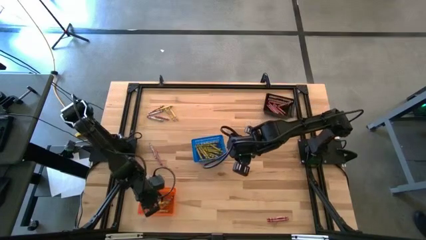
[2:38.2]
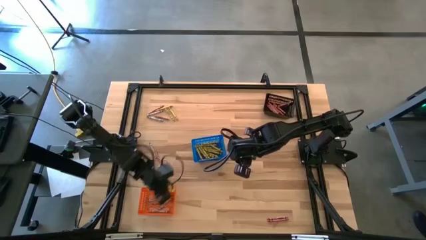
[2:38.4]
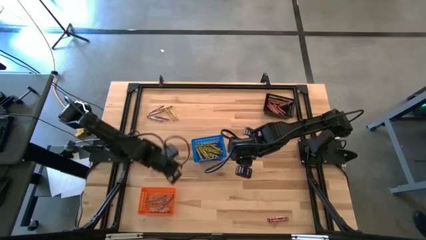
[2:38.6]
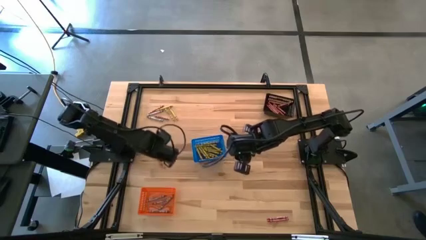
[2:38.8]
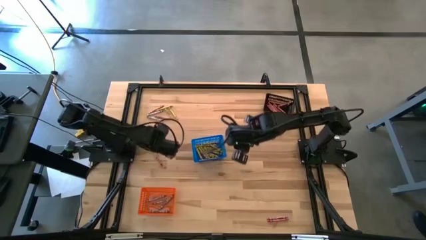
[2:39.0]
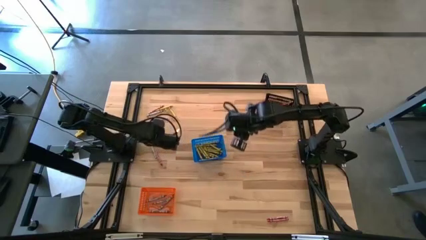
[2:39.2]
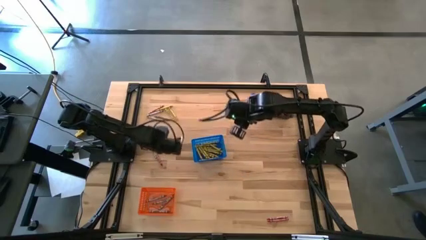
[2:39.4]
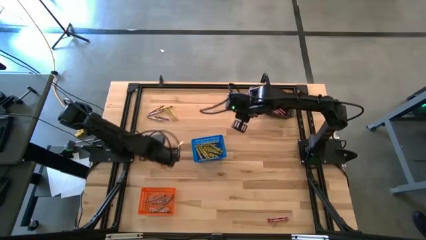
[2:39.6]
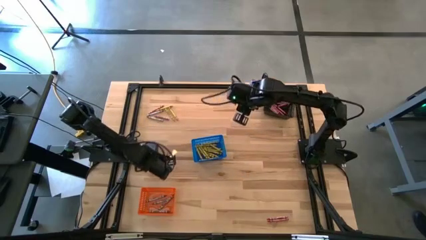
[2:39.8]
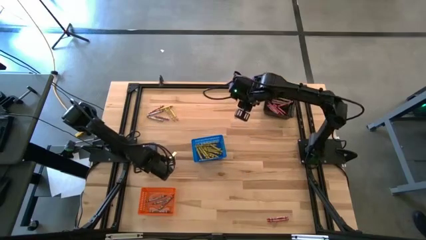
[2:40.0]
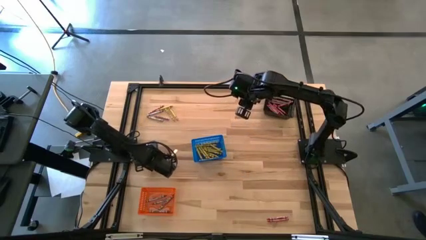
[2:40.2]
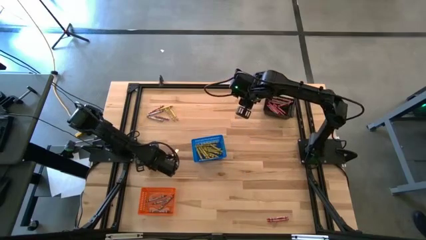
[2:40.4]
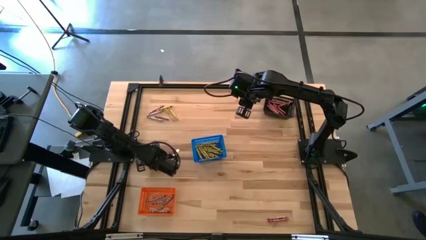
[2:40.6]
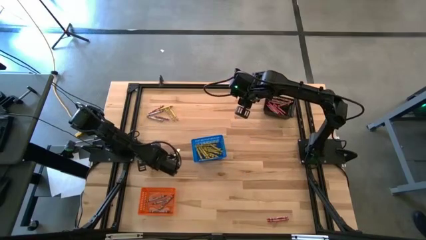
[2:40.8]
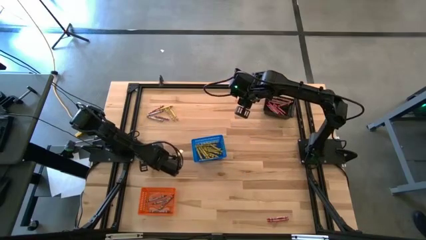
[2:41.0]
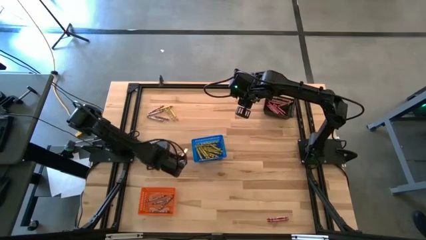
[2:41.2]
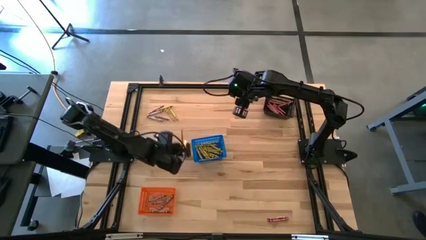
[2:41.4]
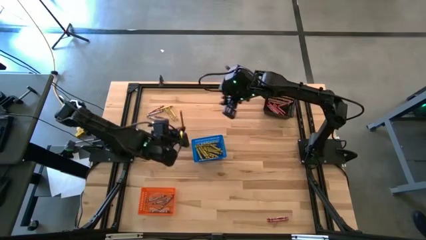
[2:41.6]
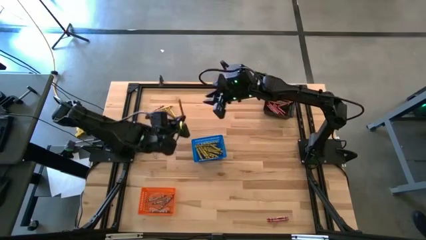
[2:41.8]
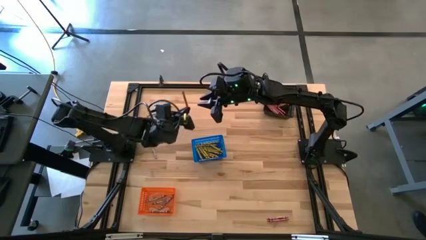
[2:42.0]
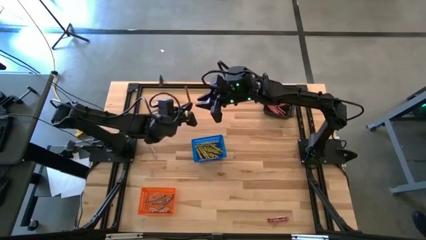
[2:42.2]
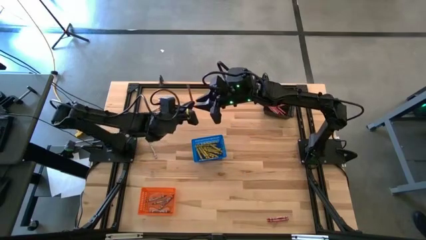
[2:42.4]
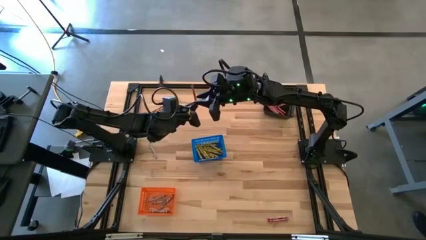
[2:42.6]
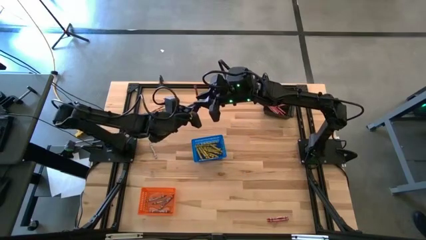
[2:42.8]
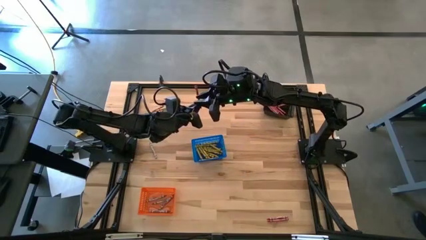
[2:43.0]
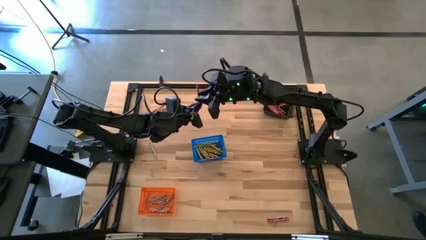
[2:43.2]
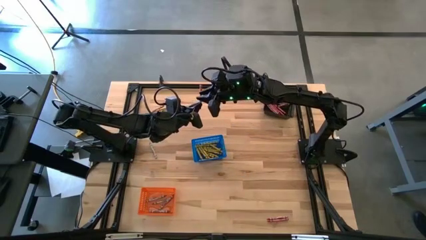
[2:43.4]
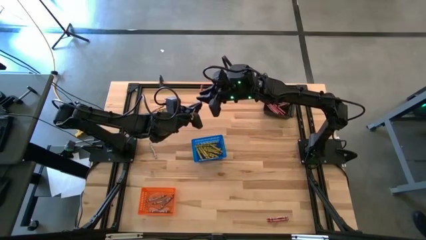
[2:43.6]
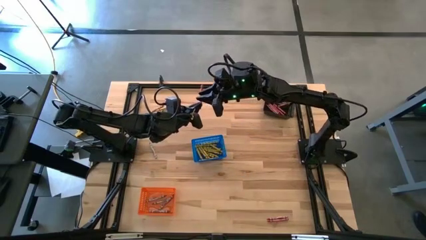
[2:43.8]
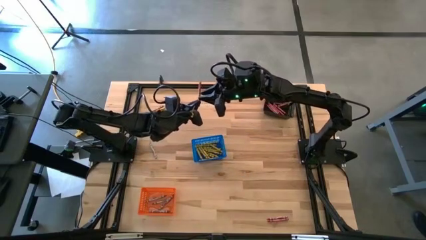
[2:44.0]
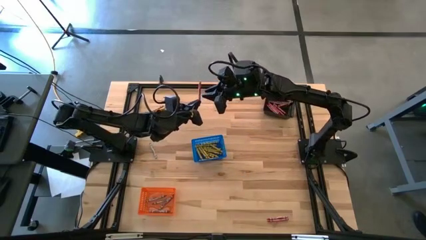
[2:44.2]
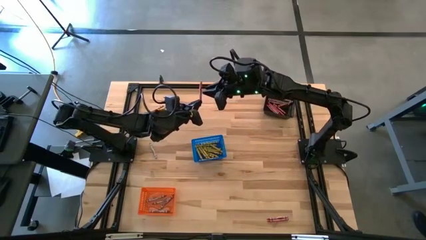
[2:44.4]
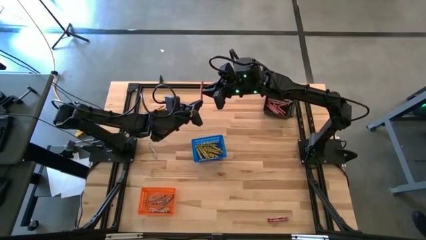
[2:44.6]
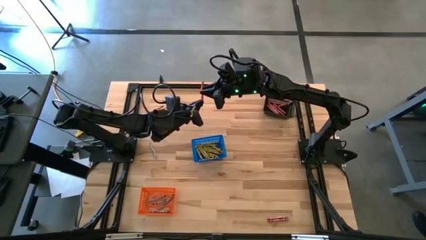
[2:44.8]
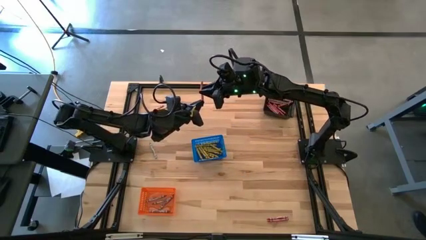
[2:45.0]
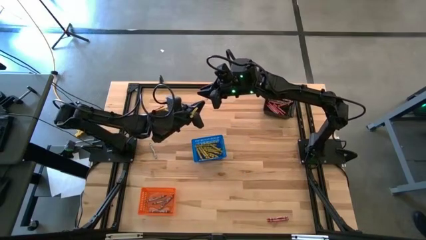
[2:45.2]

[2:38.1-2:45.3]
Task: Sort crayons
Put the red crayon into the black basket

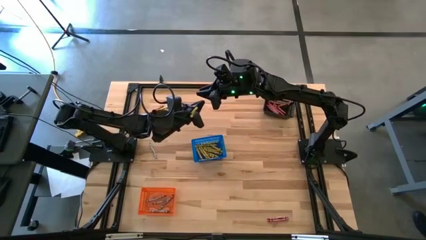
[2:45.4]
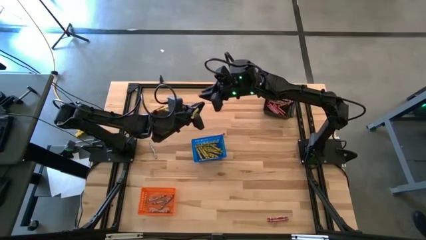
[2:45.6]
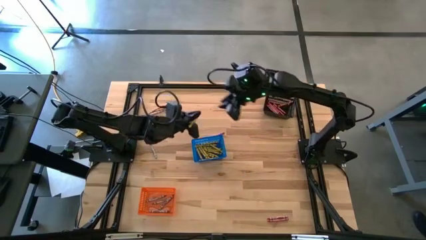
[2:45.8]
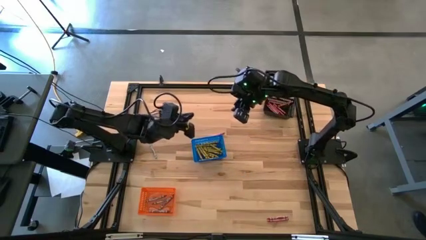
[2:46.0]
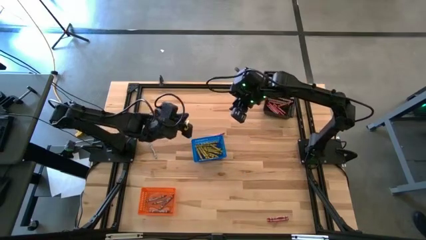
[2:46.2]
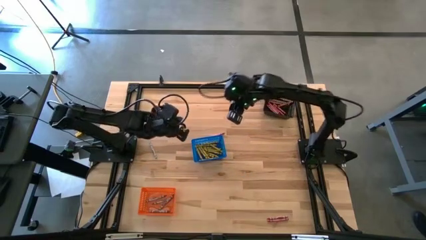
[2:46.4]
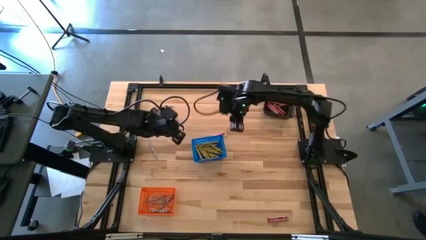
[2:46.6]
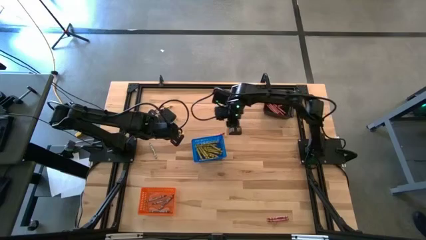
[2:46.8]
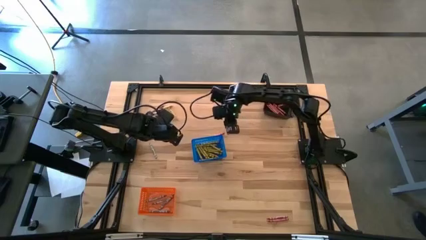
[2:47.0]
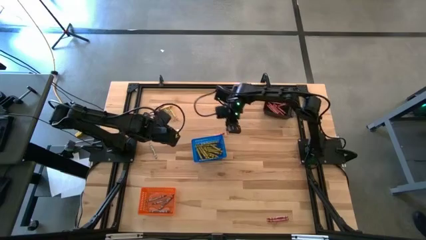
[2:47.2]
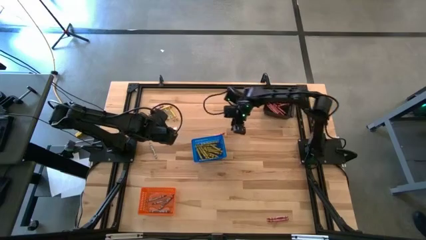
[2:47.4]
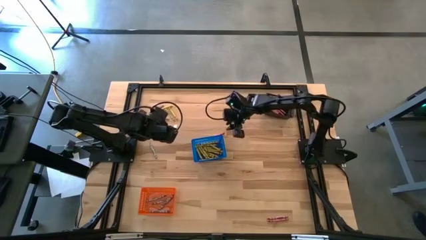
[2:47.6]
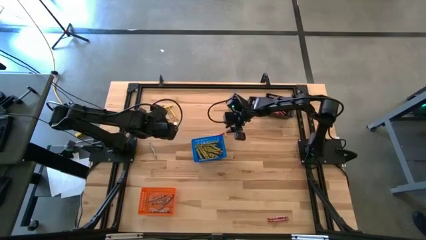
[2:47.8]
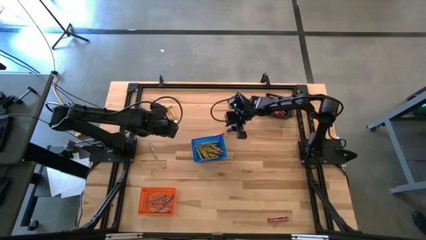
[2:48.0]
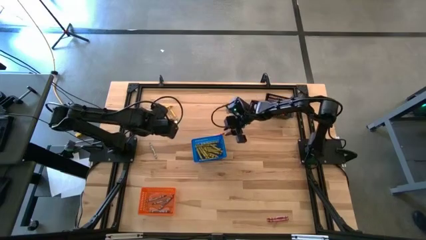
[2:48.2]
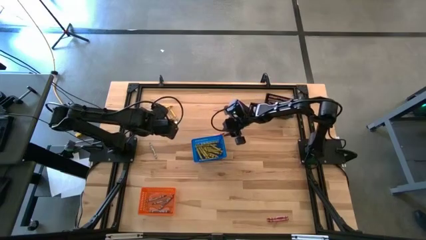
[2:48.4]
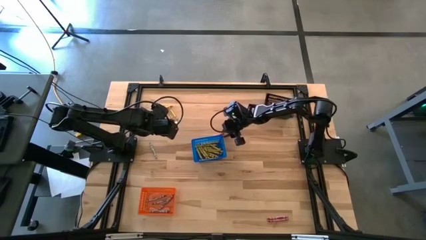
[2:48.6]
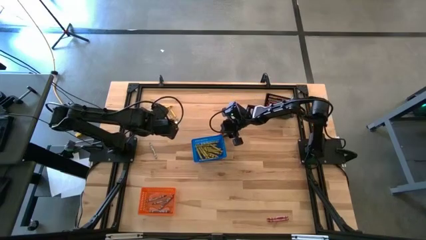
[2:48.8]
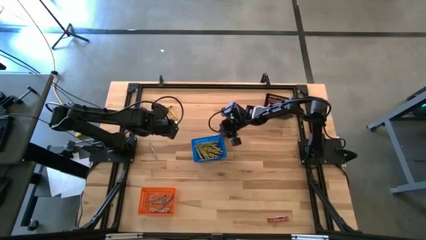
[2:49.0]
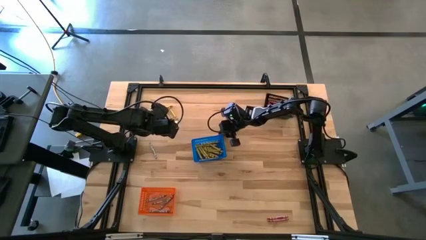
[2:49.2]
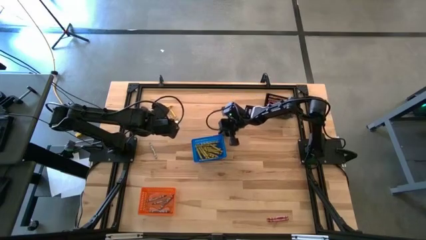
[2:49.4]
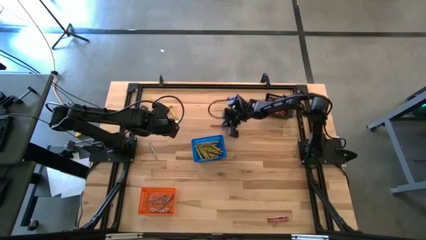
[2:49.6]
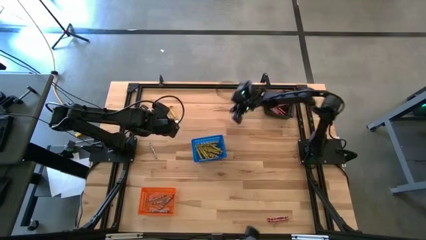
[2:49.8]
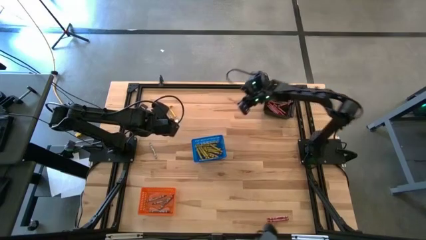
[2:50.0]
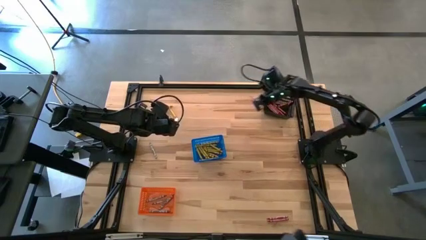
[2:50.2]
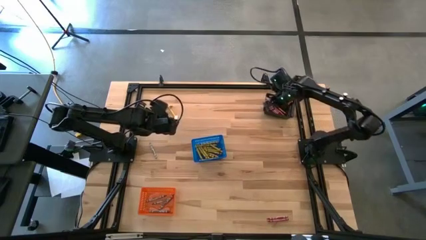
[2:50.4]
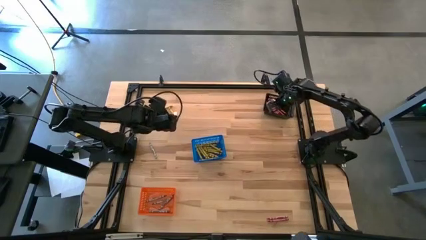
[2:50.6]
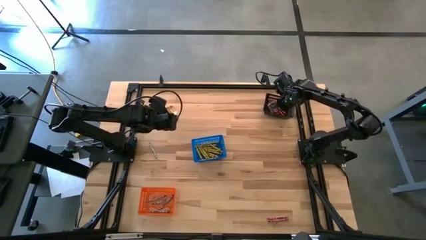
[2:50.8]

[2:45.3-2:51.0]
Put the red crayon into the black basket

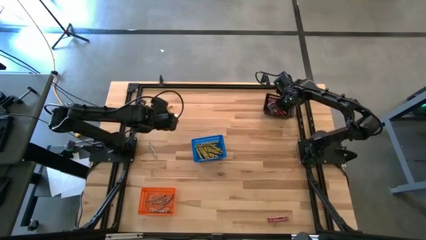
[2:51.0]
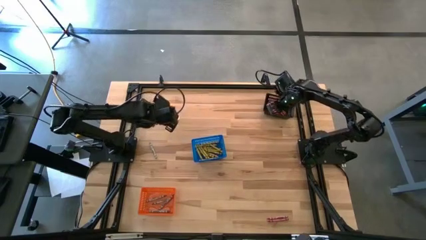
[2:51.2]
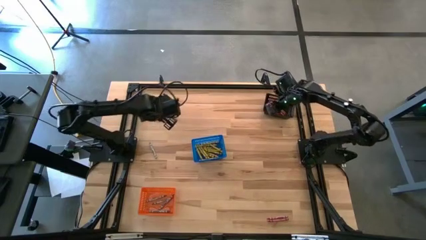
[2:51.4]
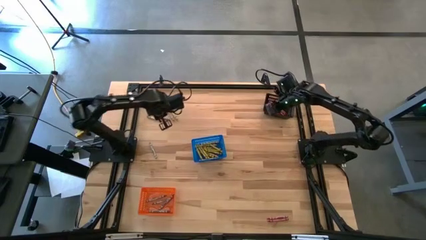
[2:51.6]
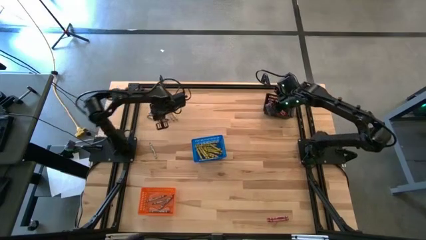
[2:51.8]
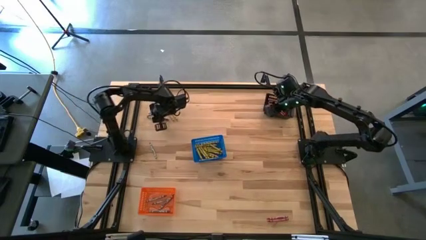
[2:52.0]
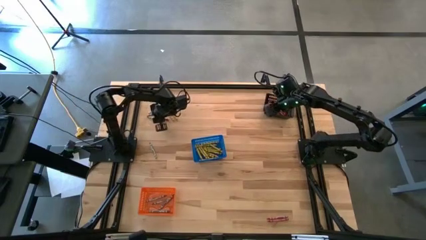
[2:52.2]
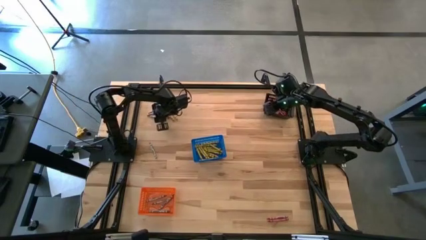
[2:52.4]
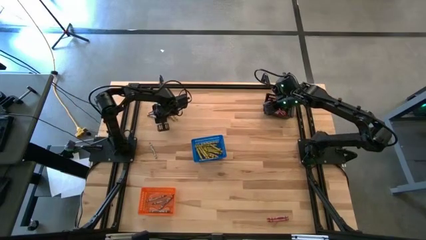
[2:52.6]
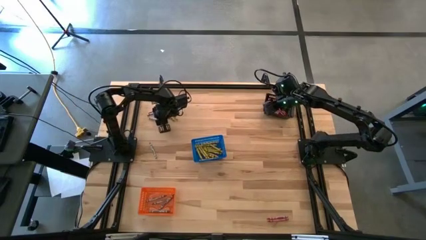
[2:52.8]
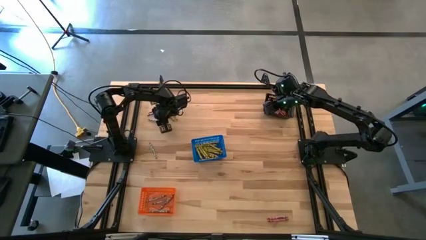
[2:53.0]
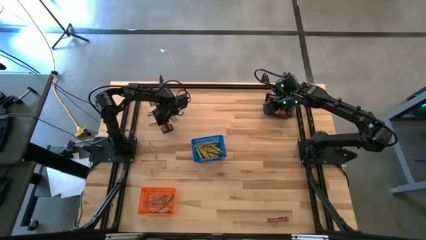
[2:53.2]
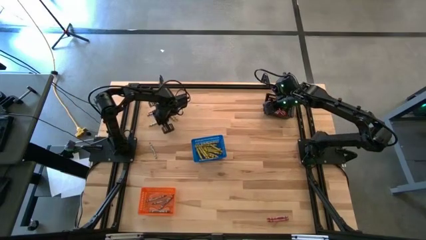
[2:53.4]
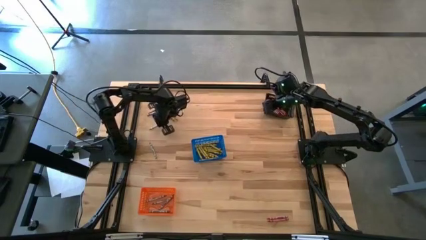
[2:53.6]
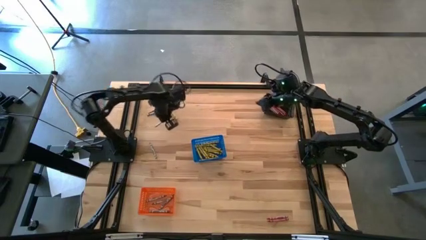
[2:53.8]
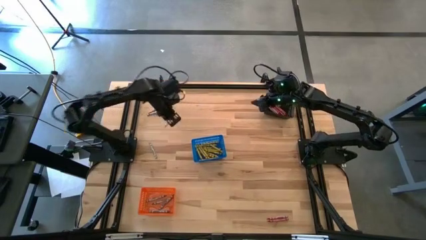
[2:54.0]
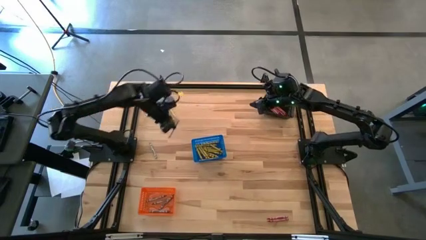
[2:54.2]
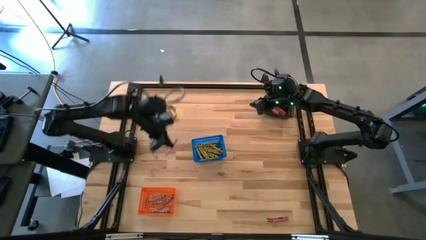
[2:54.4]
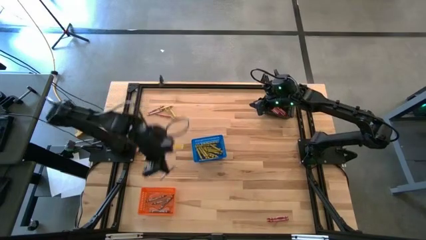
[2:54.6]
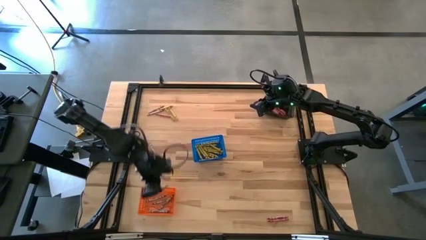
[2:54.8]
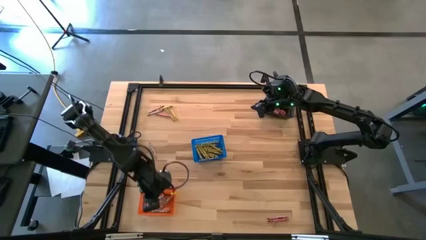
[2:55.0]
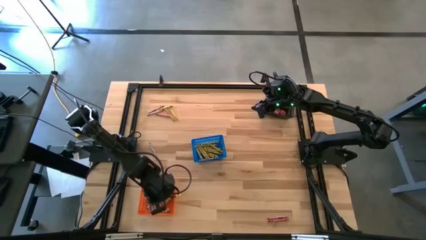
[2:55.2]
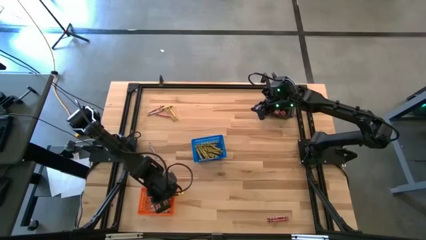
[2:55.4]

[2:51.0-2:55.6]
Put the gray crayon into the orange basket
